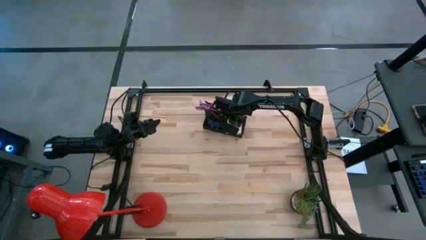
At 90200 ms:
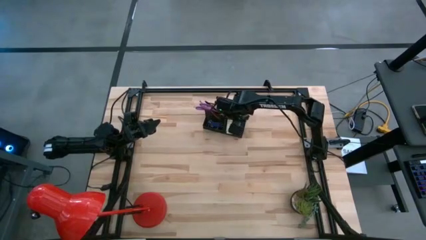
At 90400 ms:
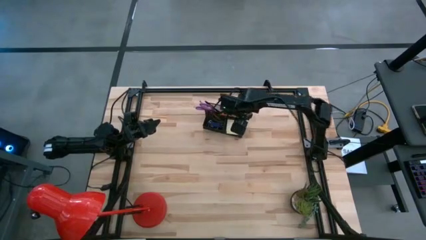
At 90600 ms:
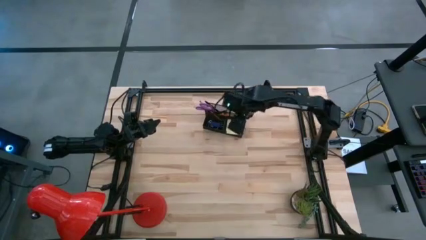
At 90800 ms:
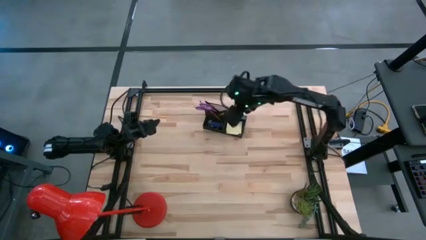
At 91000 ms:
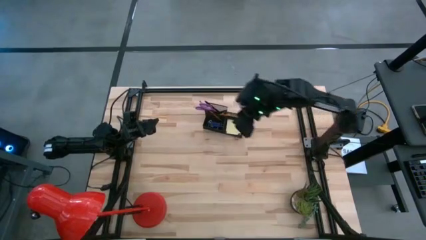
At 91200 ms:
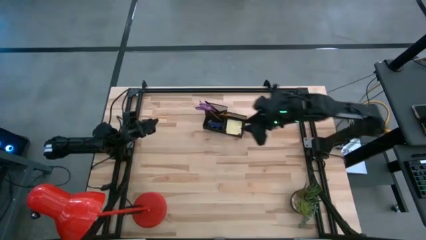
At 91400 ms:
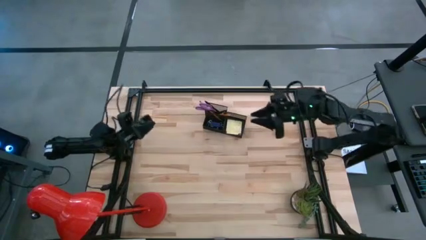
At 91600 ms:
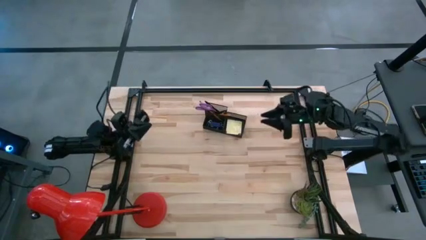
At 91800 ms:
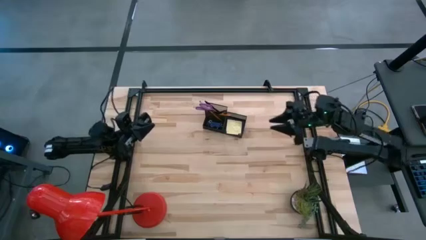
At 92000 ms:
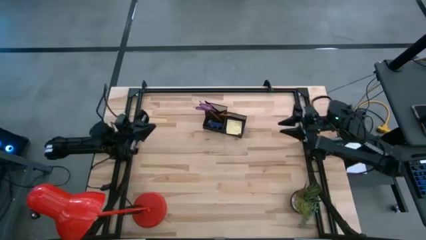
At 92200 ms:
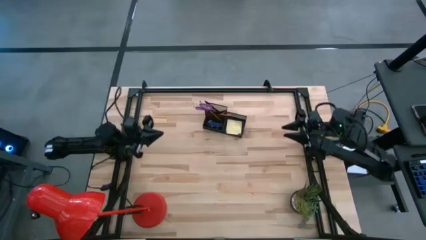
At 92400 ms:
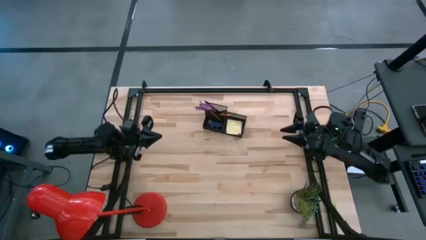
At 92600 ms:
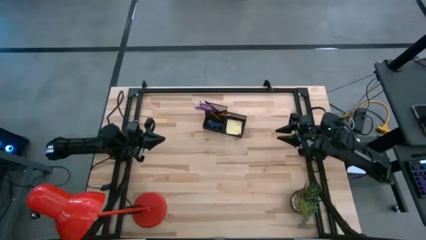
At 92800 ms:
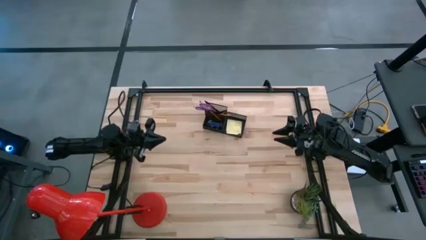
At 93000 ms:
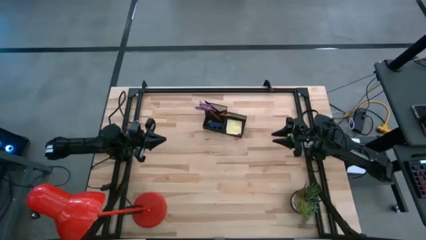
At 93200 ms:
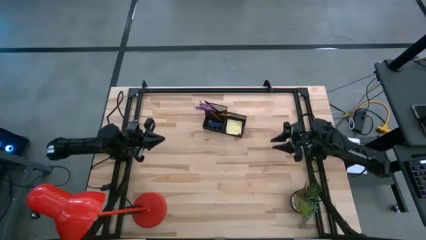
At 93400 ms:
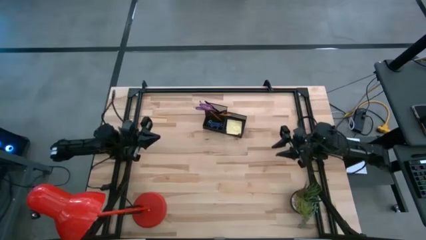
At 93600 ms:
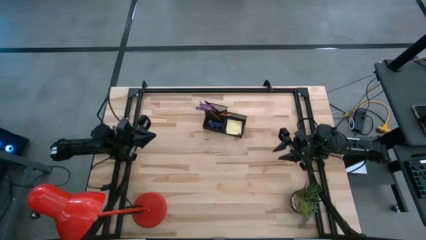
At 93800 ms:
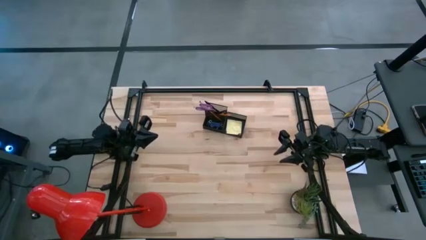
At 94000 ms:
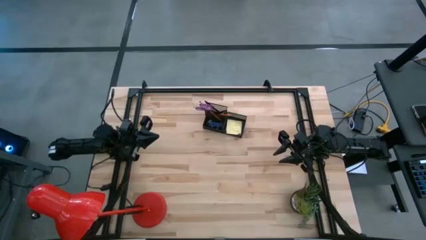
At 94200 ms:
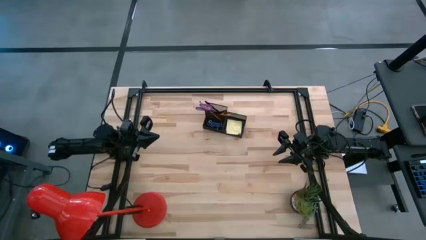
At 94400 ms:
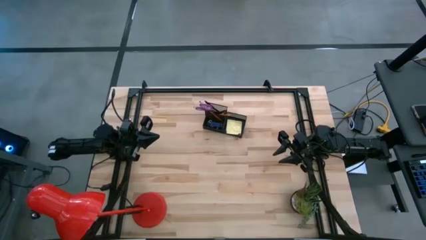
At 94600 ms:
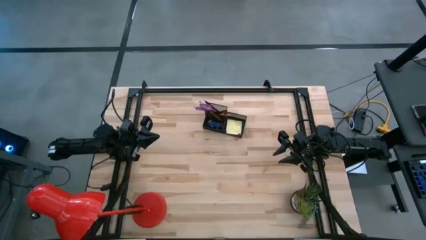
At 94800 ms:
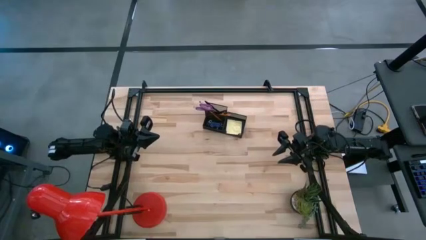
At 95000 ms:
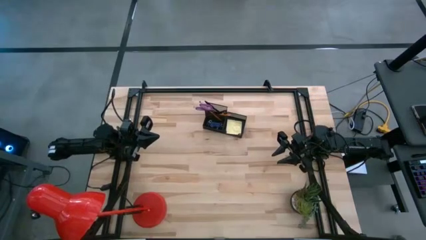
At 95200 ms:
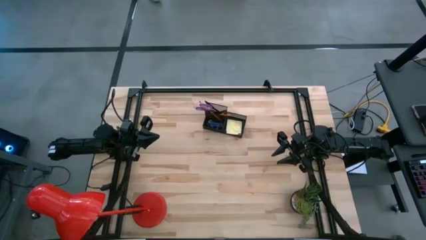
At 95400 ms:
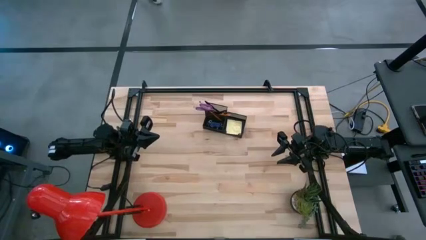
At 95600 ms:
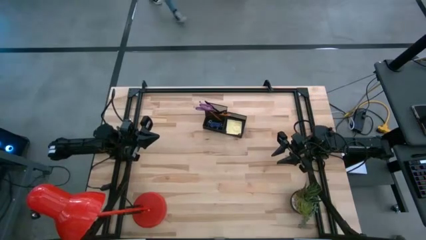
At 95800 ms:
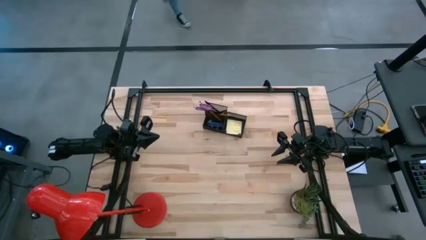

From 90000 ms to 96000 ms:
Task: Pick and place office supplies into organizer
Return to Home Position

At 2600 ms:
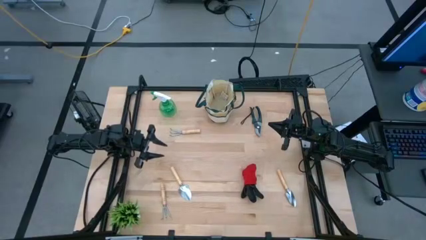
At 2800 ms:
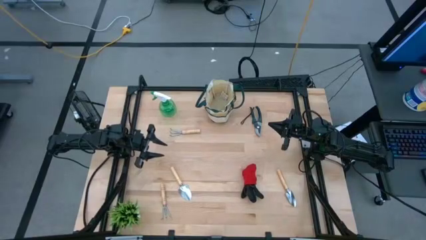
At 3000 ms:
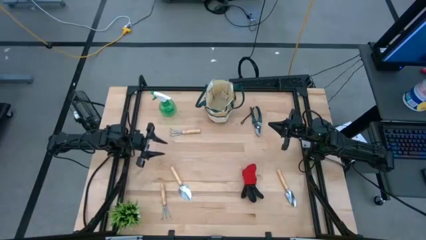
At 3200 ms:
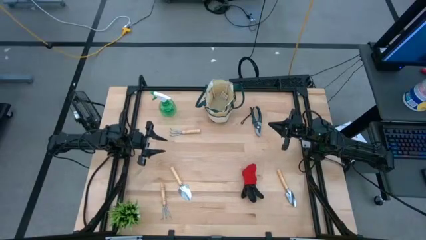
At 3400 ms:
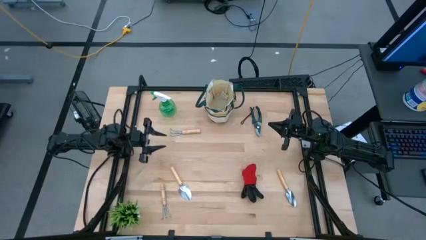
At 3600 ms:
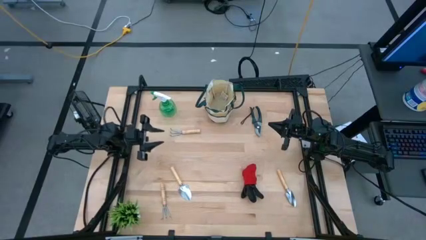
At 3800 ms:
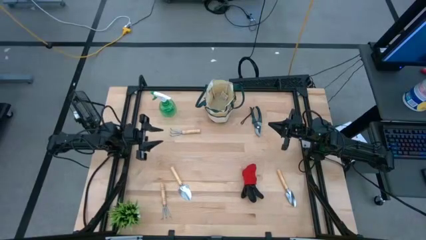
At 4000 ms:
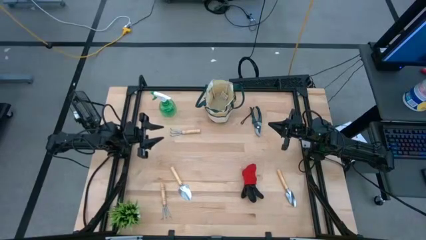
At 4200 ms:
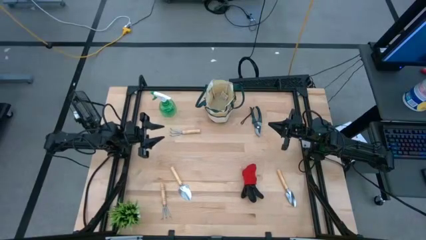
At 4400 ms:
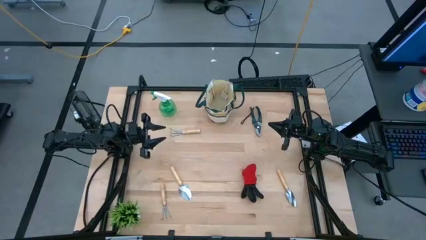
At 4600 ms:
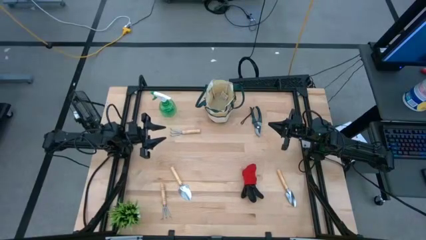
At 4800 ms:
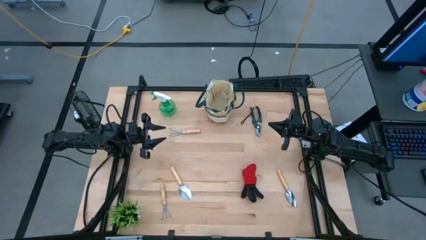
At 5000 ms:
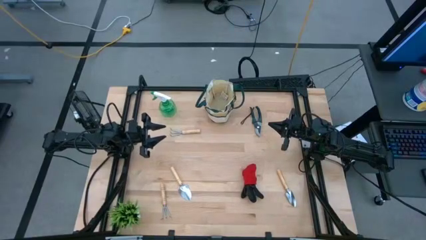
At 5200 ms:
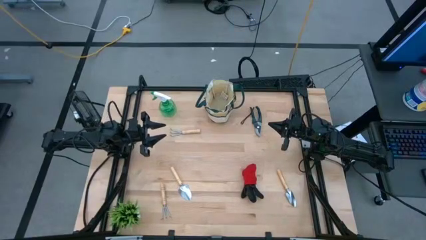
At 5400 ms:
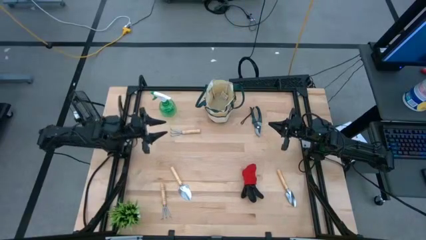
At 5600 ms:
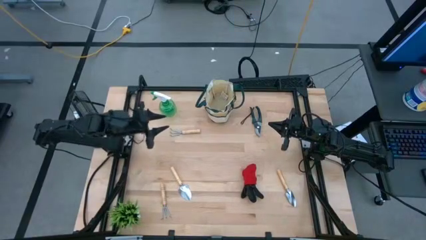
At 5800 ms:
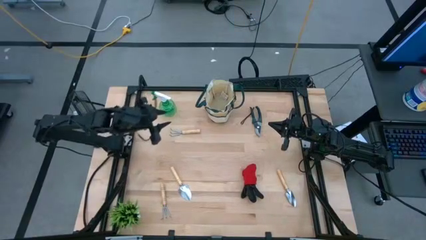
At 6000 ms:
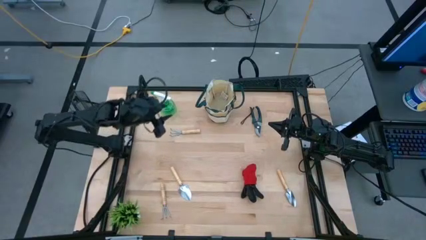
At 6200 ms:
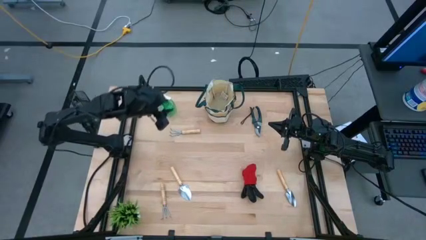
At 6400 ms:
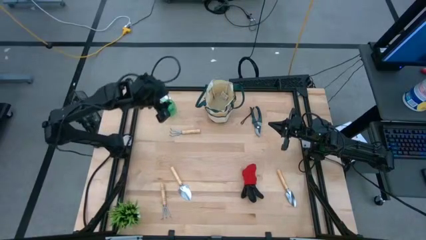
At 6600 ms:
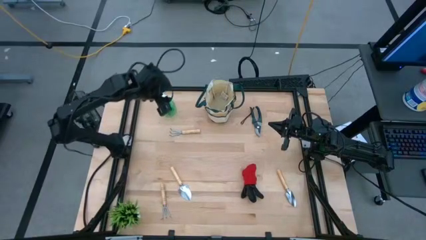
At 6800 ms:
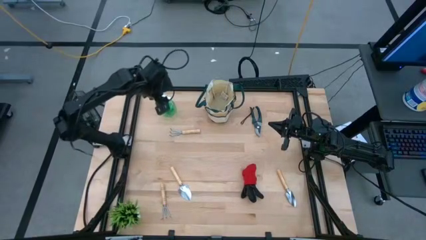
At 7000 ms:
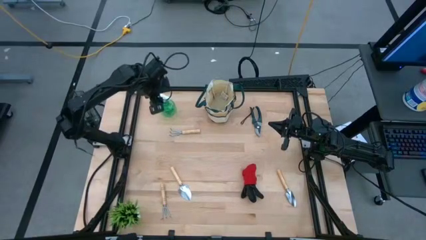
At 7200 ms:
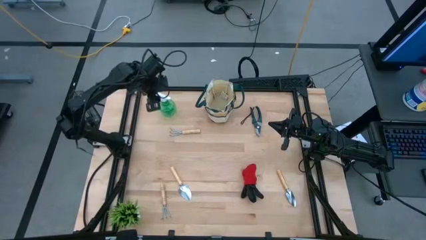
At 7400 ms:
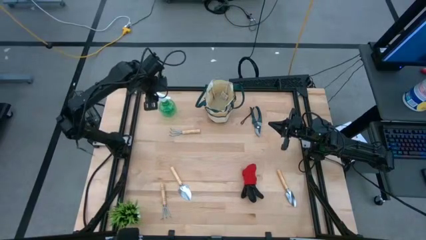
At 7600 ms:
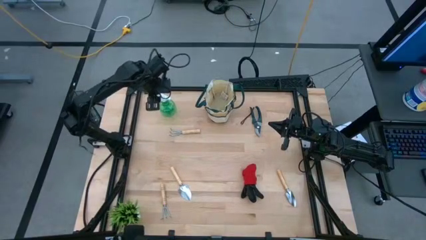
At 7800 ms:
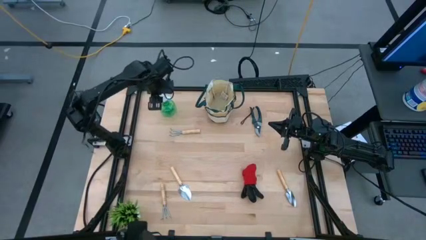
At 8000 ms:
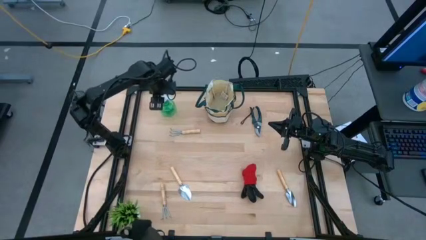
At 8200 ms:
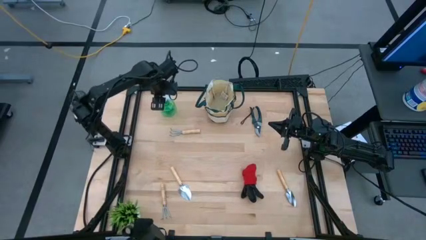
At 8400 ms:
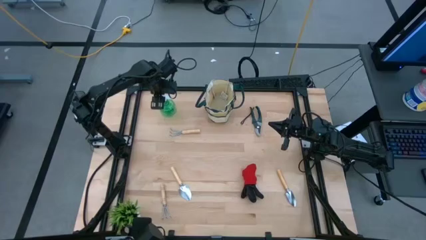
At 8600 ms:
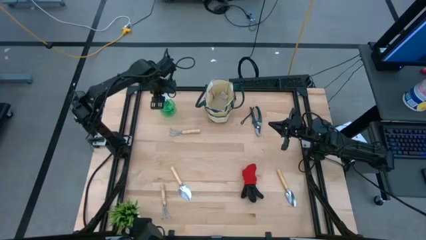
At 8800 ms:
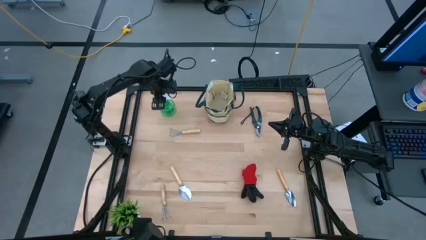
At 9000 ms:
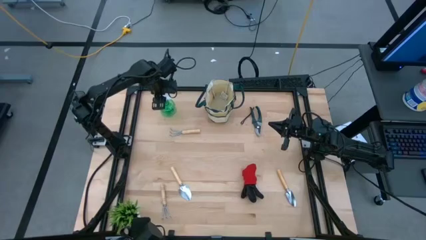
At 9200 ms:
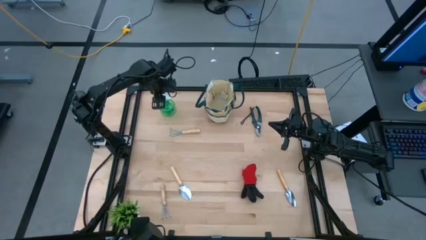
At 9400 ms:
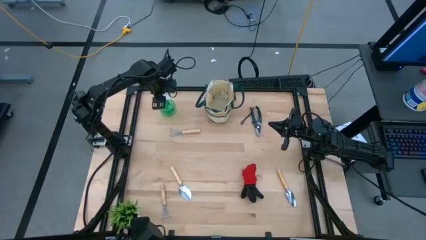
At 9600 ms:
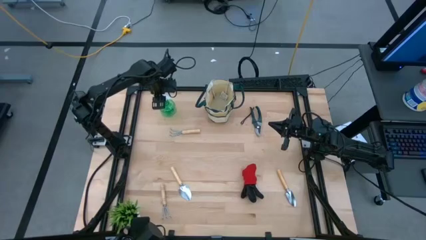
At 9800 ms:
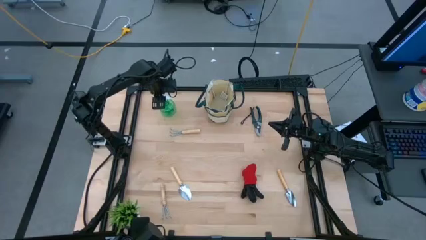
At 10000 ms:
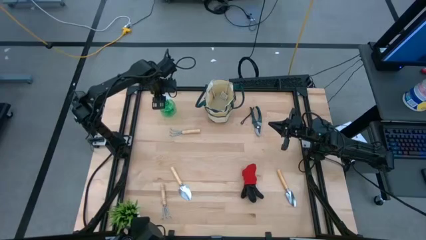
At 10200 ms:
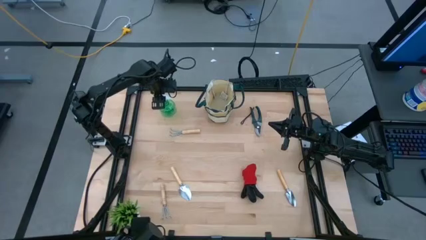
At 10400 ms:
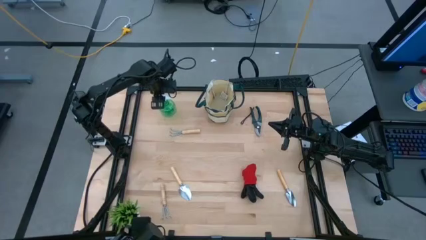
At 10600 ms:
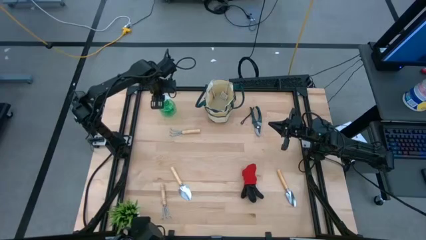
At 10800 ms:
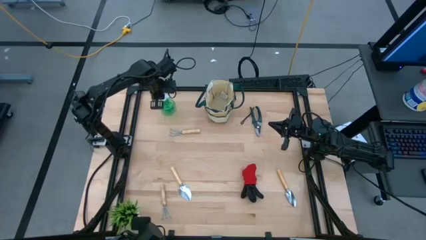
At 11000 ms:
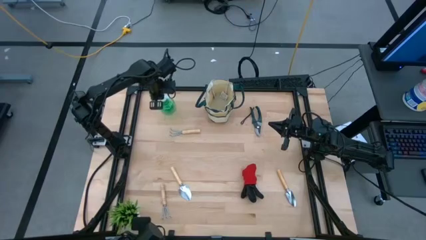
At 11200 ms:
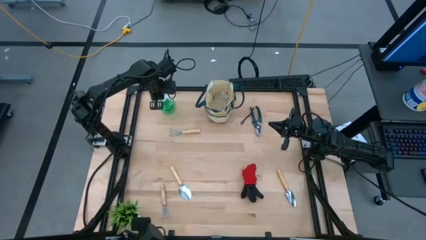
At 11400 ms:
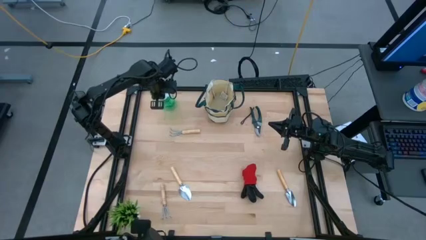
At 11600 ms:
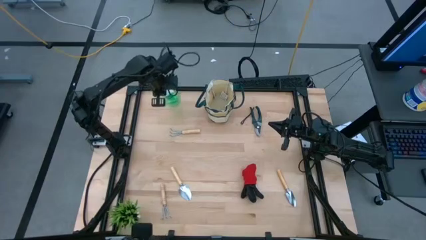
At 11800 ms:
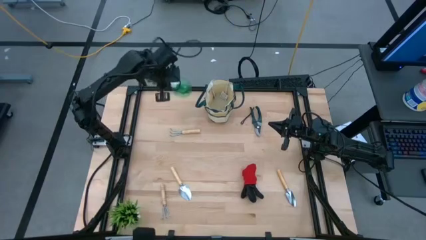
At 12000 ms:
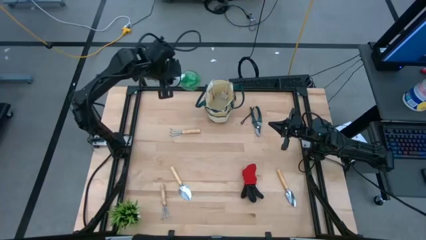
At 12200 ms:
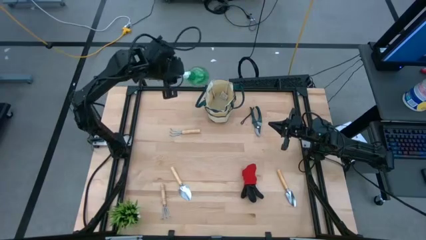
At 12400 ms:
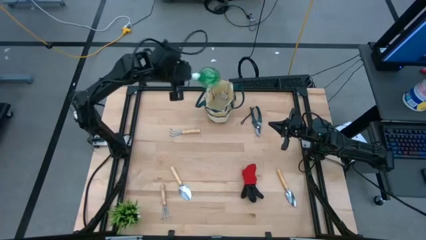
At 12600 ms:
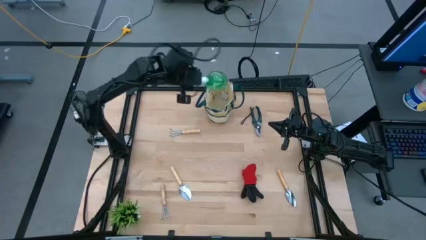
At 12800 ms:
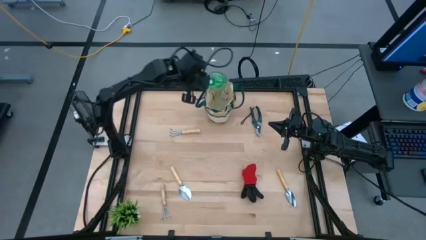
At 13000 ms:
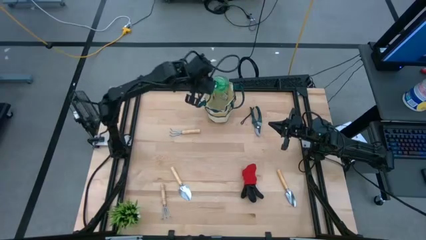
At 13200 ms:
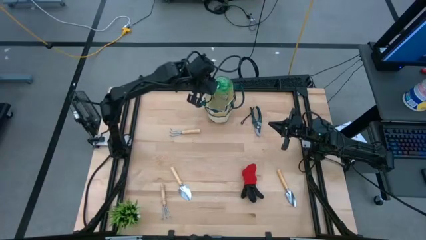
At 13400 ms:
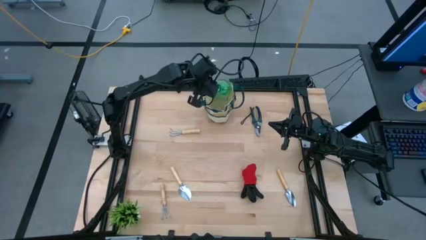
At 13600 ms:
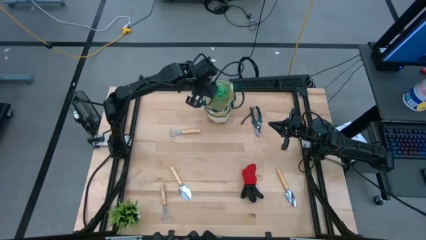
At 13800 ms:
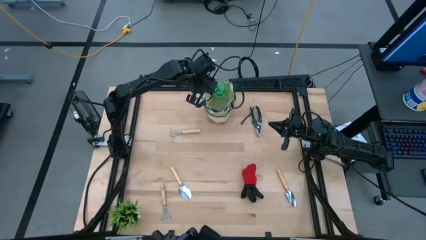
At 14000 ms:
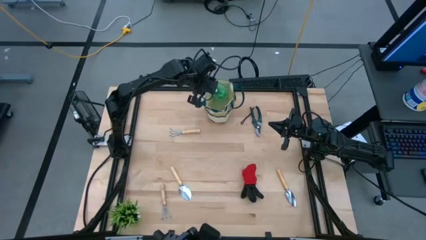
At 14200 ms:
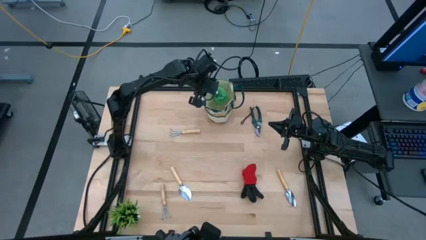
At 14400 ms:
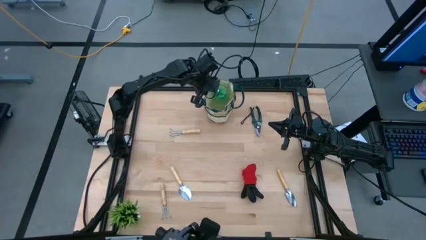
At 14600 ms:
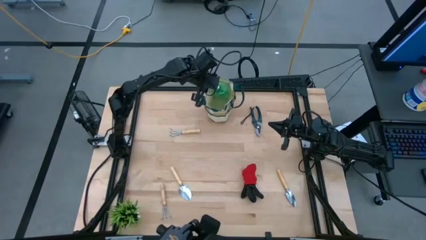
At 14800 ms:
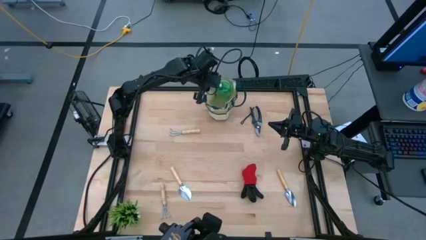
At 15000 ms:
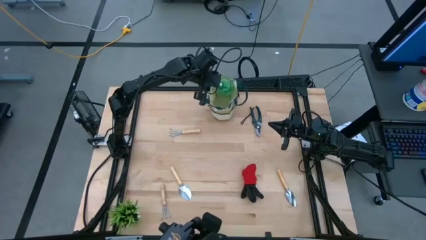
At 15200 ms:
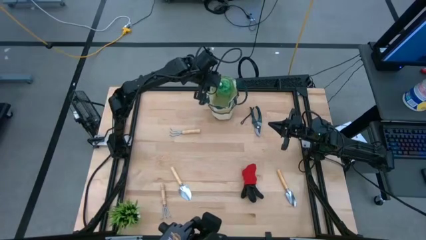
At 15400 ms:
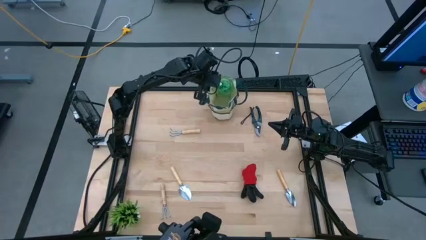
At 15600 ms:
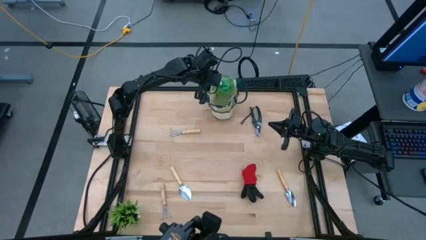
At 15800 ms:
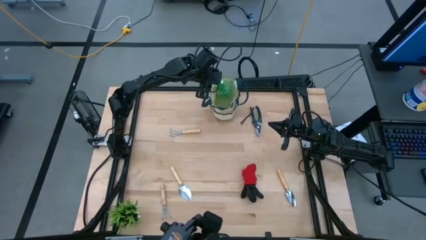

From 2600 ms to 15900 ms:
Task: Pick & Place Garden tools in Gardening bag
Put the spray bottle into the gardening bag
